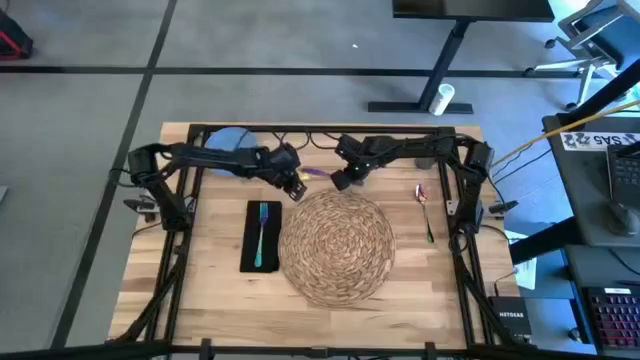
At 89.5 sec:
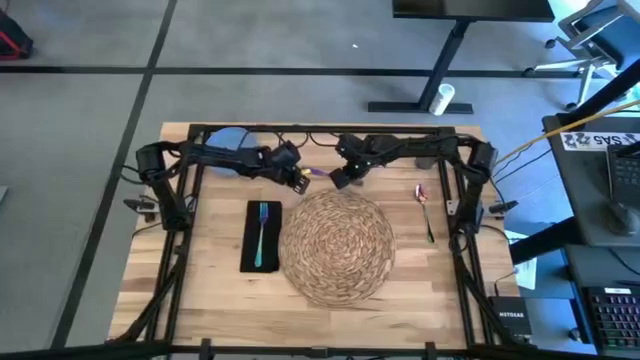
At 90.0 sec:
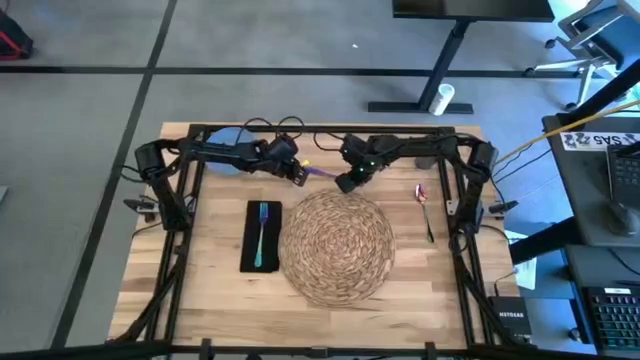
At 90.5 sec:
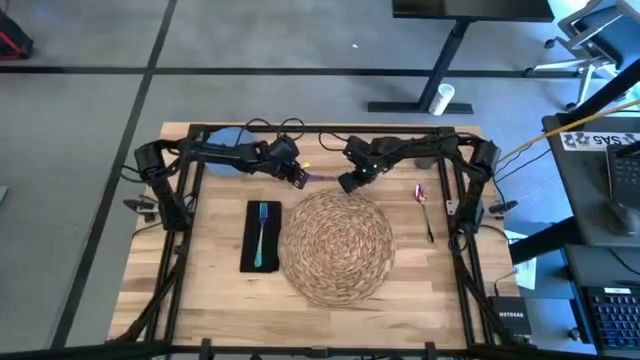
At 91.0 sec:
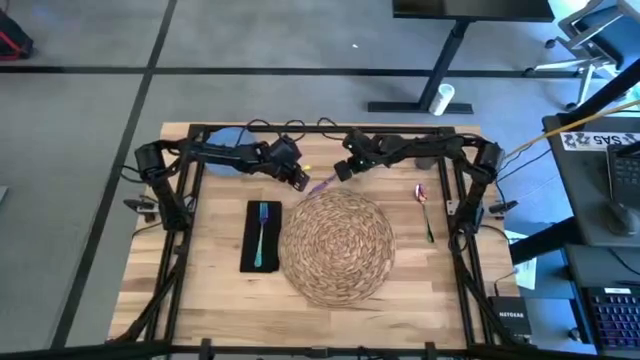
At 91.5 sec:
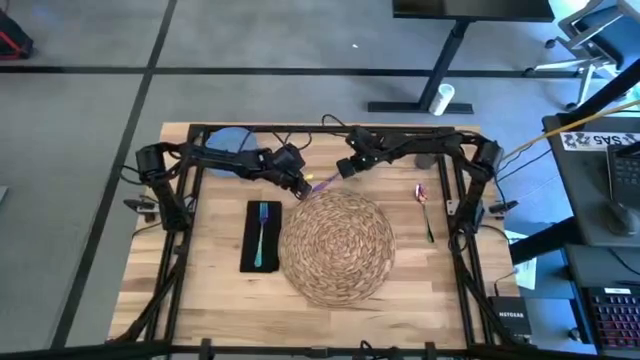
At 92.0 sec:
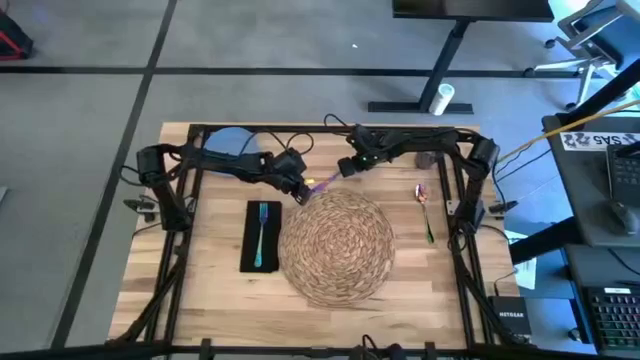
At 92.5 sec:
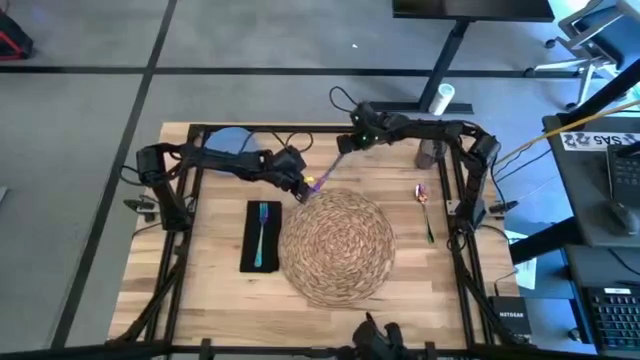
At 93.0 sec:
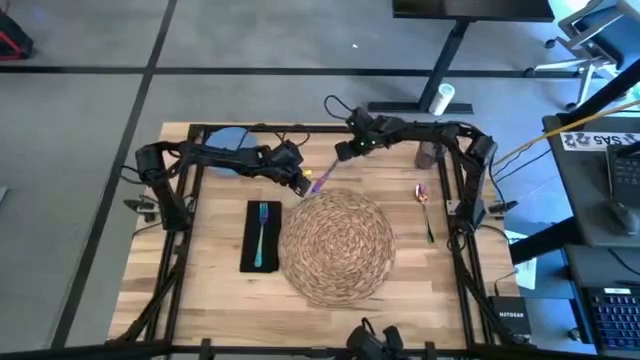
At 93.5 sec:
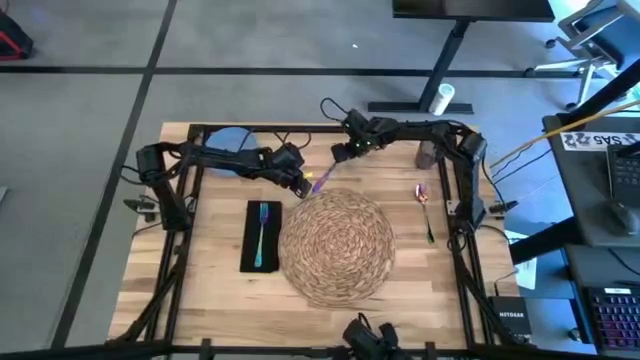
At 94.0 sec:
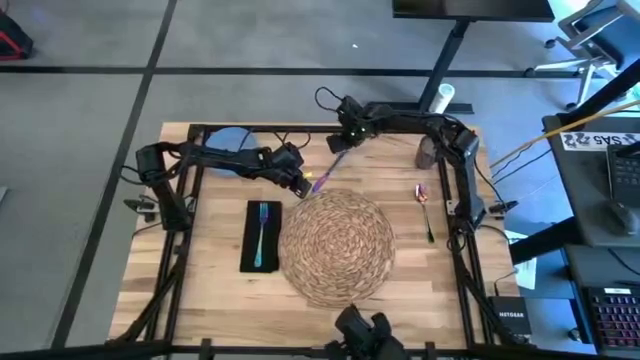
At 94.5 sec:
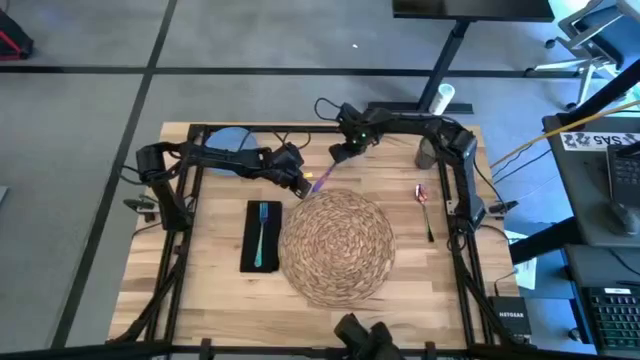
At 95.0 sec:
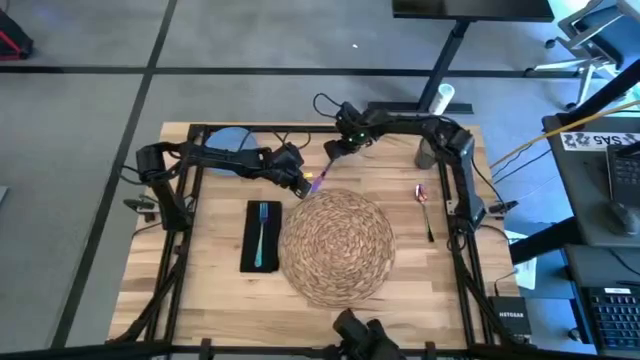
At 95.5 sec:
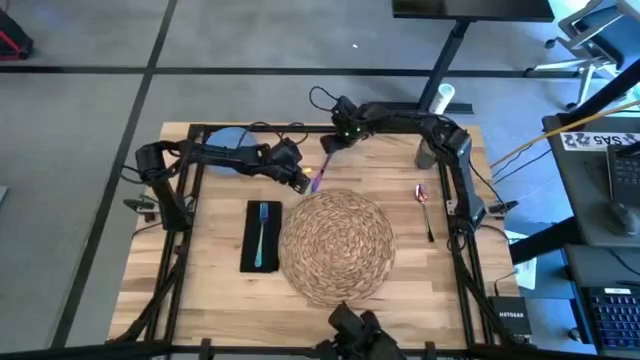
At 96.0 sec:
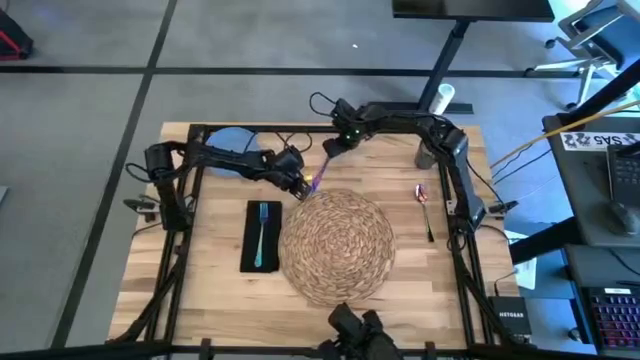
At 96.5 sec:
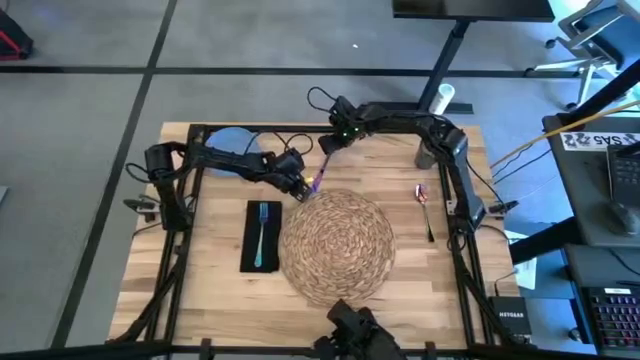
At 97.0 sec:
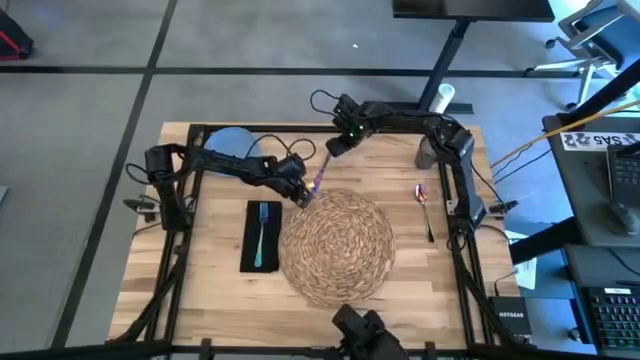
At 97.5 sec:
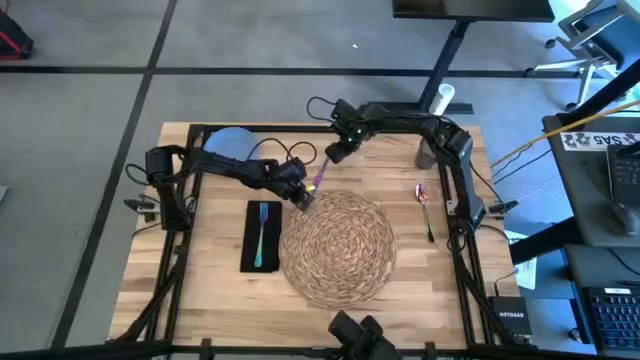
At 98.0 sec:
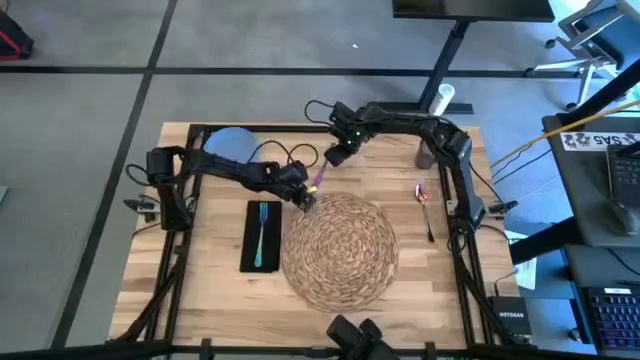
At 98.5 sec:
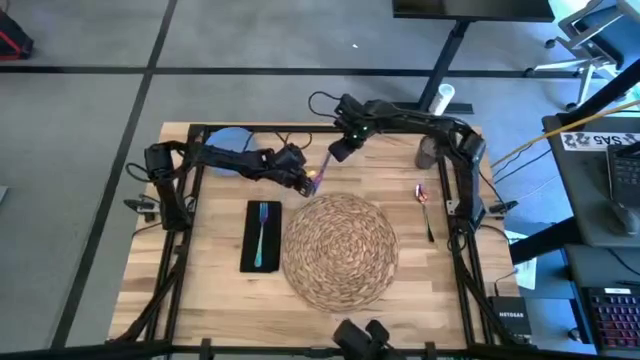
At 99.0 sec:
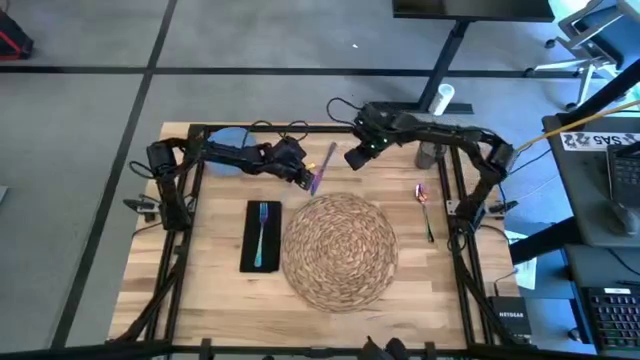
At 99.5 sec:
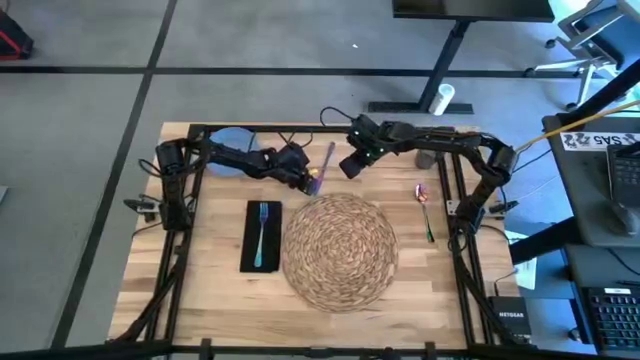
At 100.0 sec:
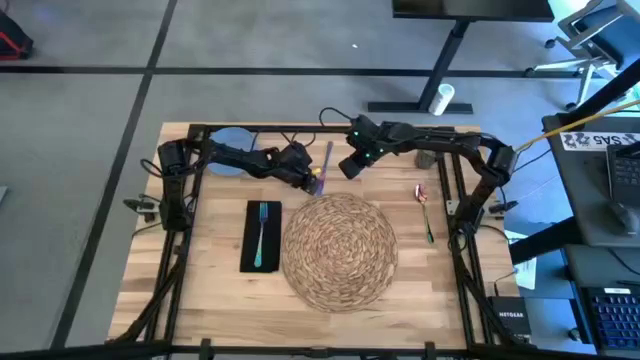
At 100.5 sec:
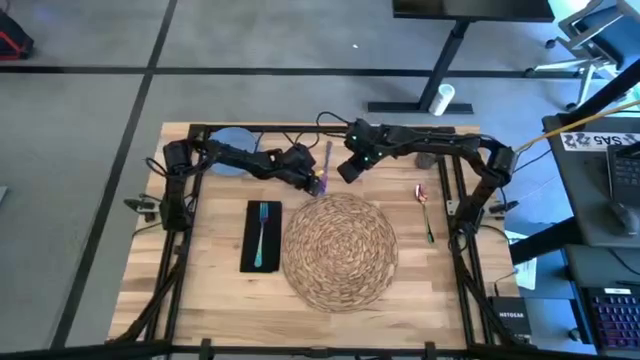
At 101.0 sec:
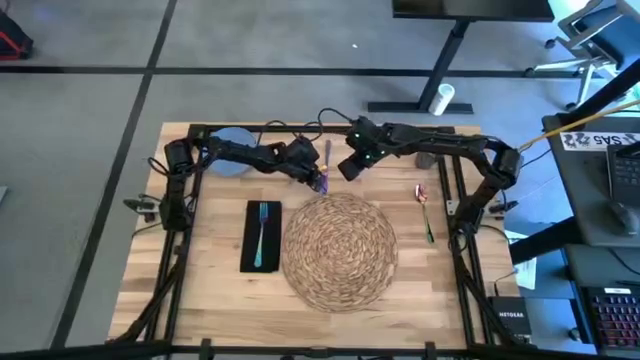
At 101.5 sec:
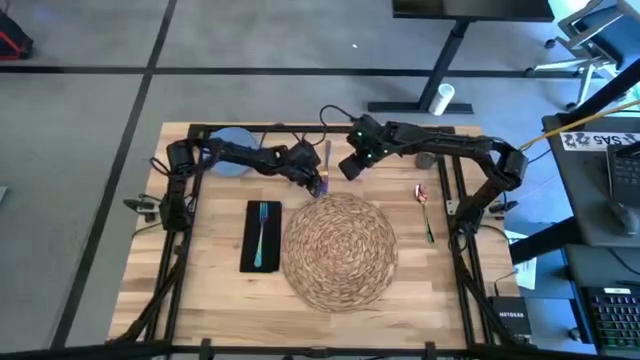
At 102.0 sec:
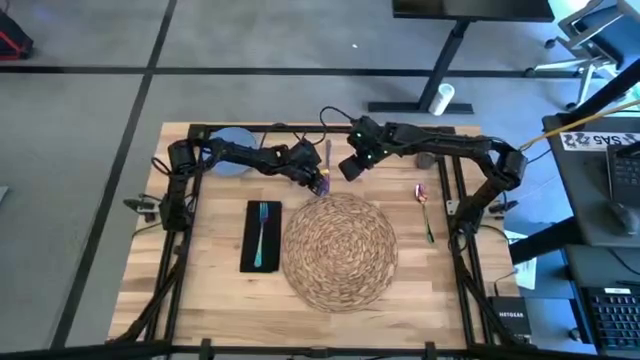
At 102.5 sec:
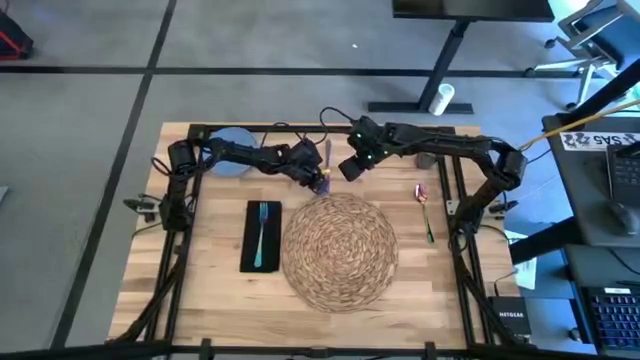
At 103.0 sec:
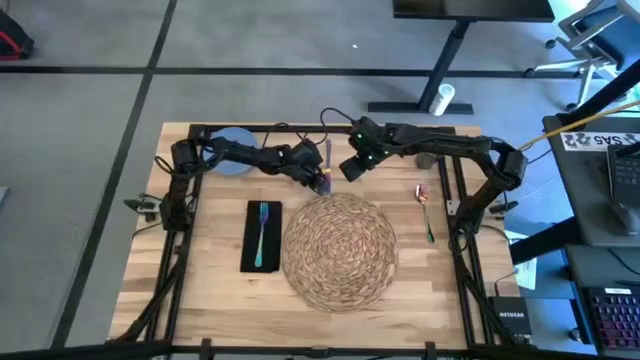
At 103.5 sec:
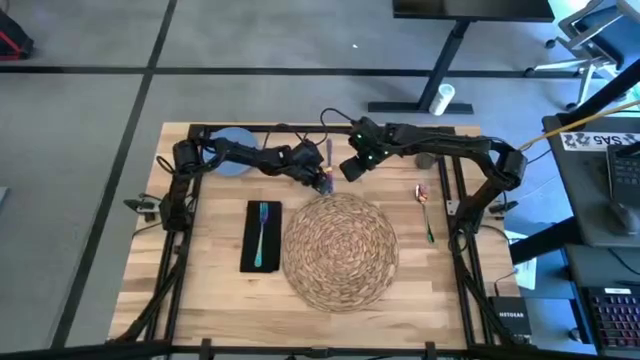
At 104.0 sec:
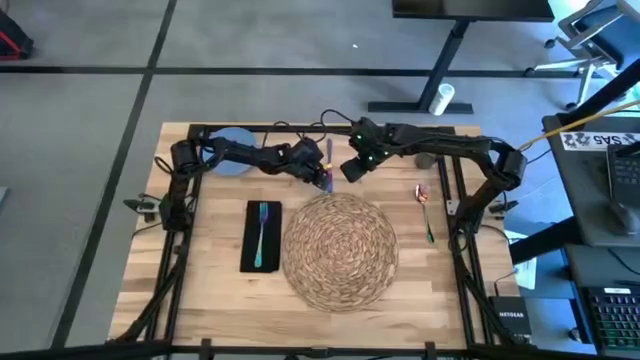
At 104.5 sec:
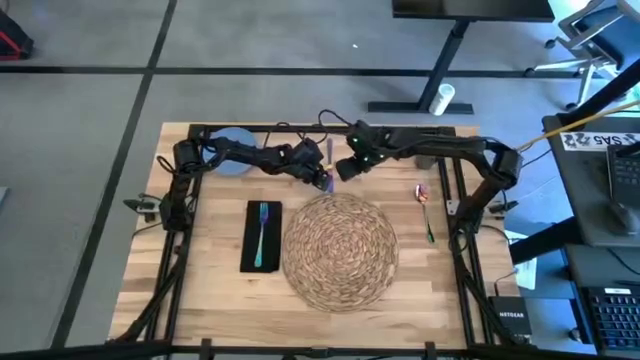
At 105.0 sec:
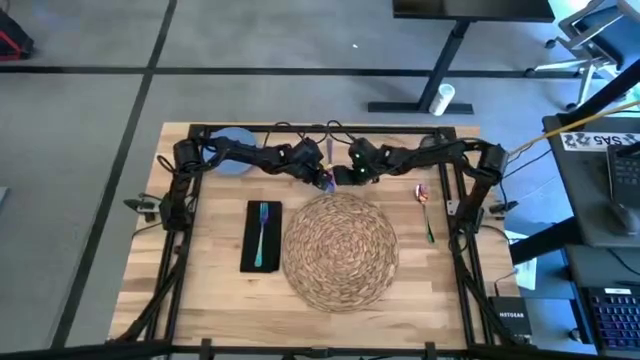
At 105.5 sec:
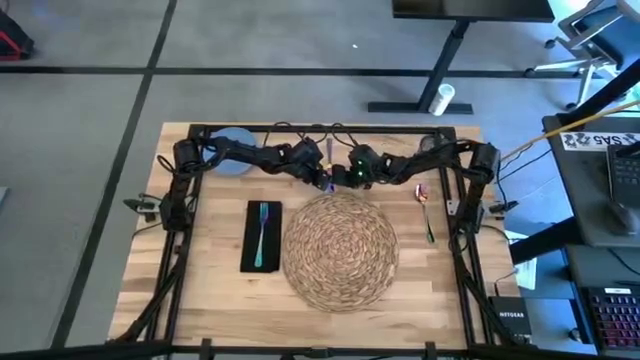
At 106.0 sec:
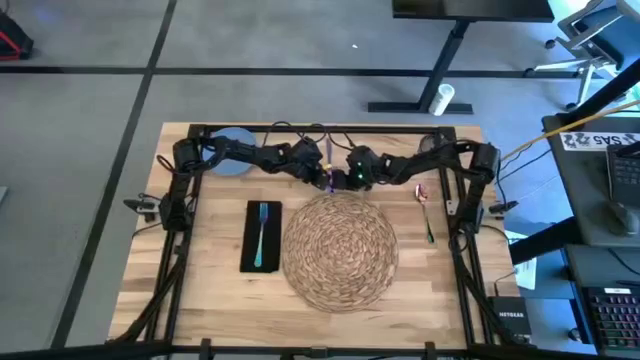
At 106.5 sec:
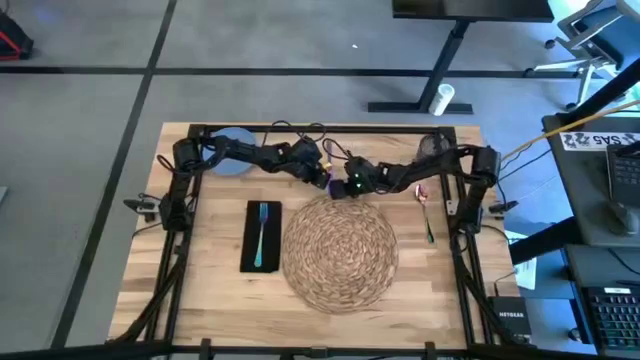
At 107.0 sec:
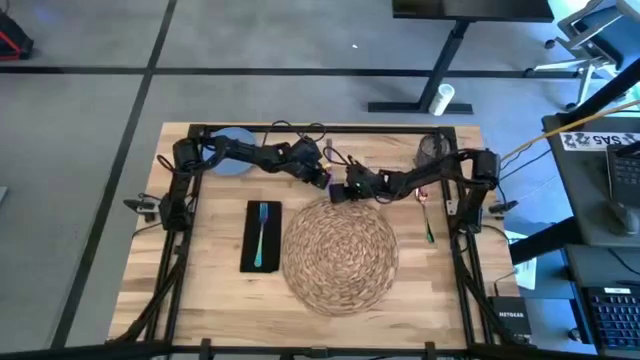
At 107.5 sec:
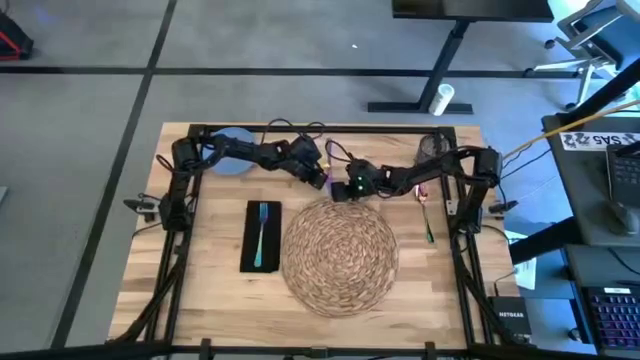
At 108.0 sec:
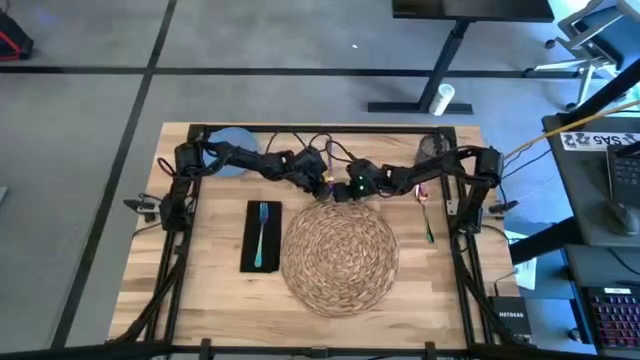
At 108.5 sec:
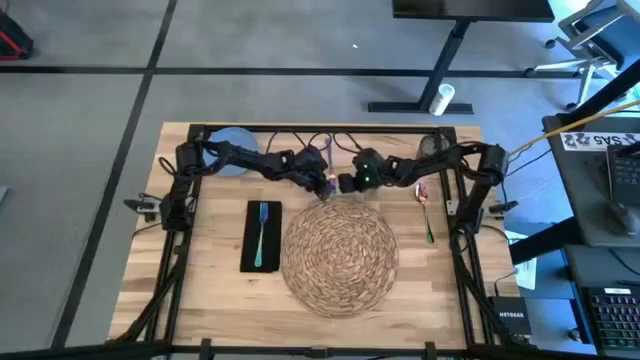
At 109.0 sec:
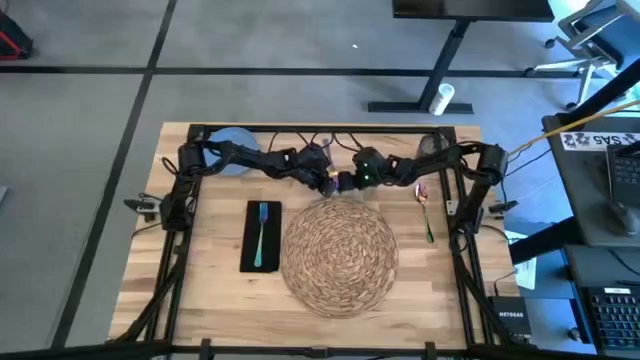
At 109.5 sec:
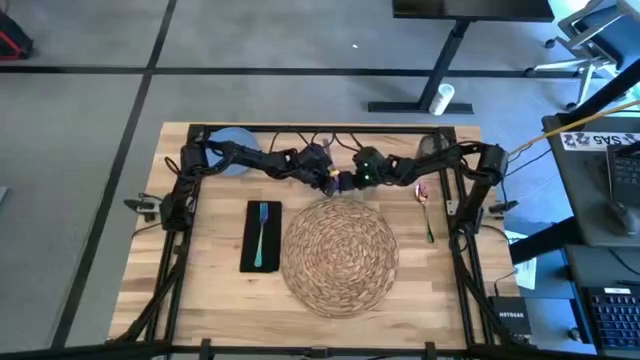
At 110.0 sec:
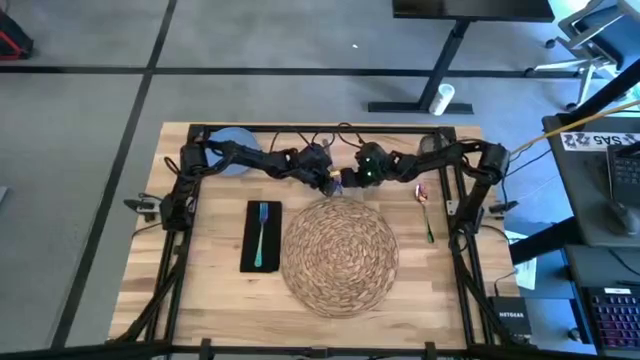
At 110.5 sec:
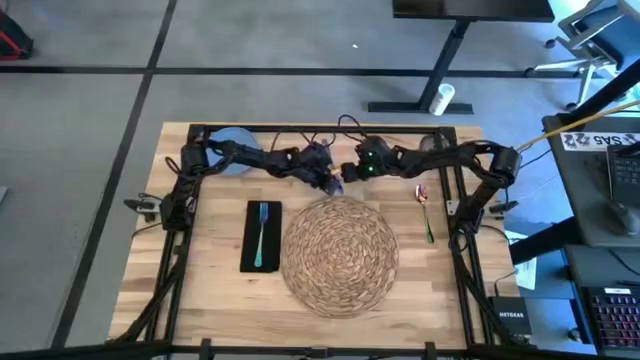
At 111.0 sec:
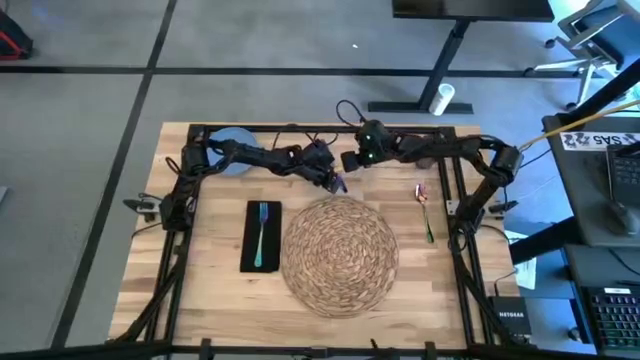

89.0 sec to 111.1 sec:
Task: Set table place
Put the blue table knife on top of the brown placemat
